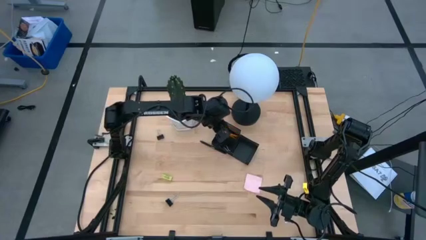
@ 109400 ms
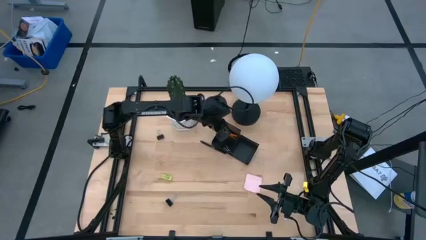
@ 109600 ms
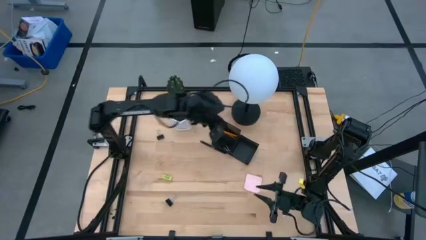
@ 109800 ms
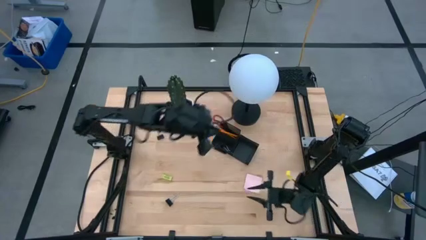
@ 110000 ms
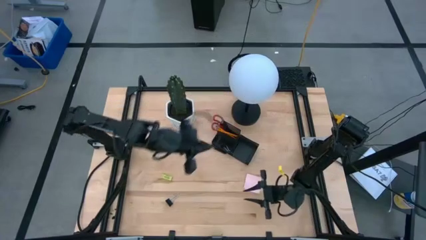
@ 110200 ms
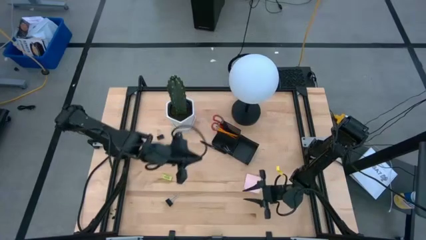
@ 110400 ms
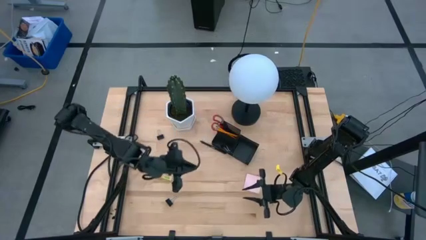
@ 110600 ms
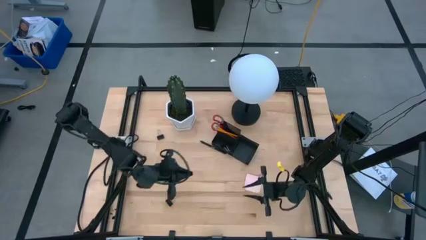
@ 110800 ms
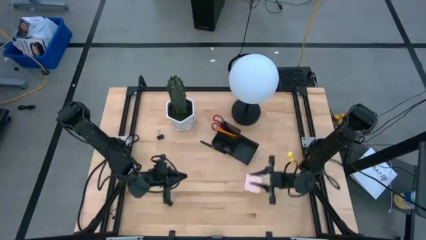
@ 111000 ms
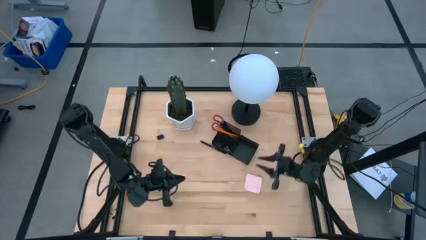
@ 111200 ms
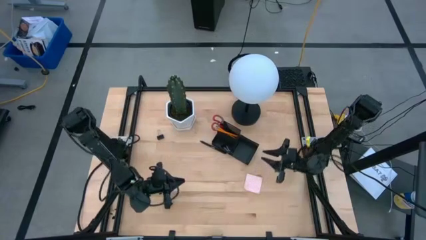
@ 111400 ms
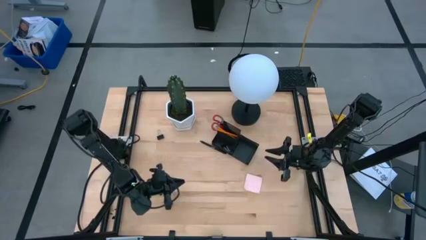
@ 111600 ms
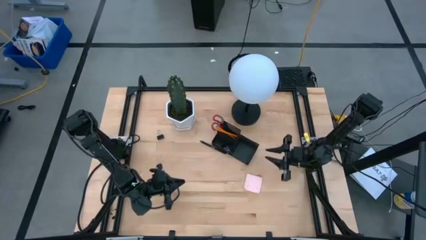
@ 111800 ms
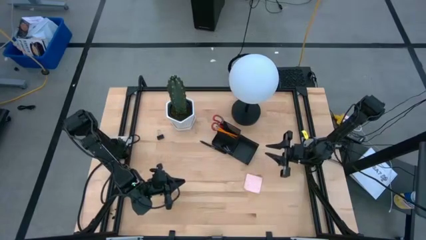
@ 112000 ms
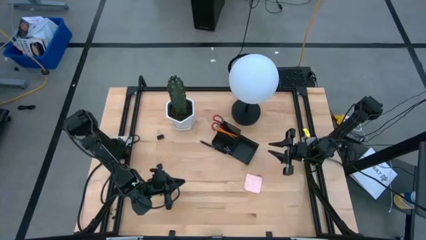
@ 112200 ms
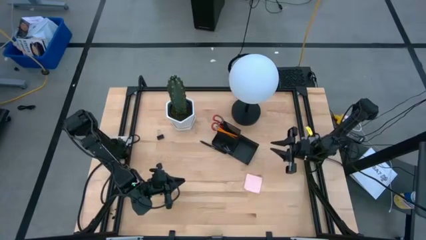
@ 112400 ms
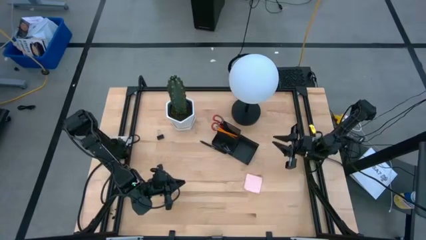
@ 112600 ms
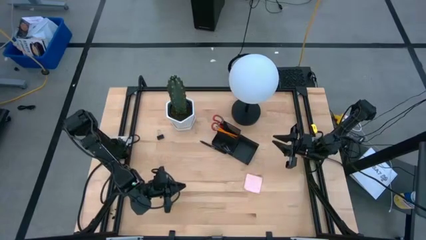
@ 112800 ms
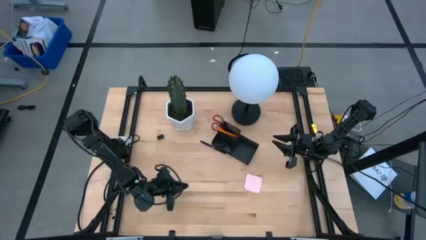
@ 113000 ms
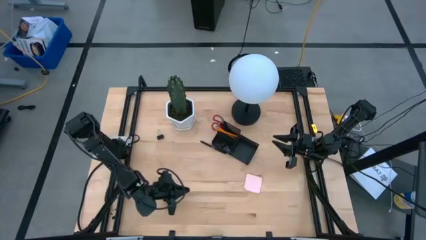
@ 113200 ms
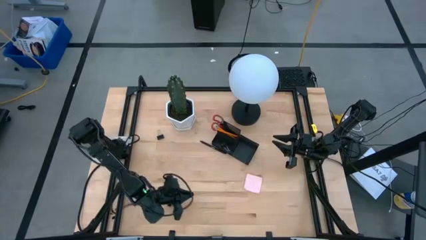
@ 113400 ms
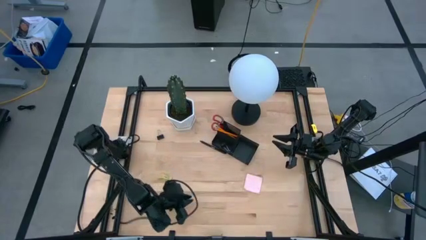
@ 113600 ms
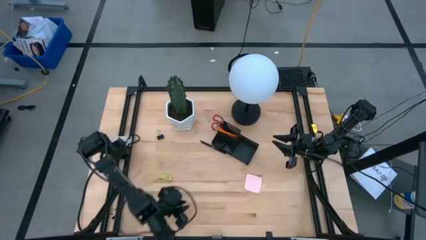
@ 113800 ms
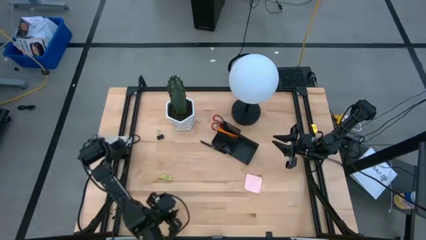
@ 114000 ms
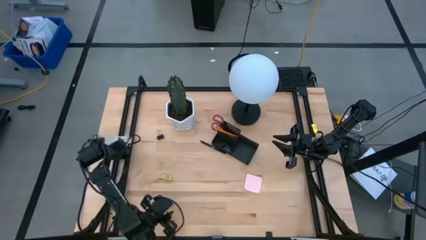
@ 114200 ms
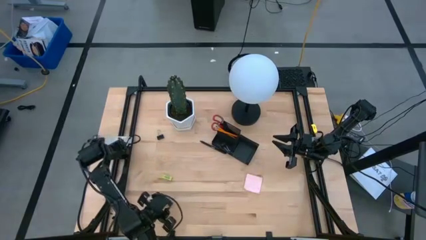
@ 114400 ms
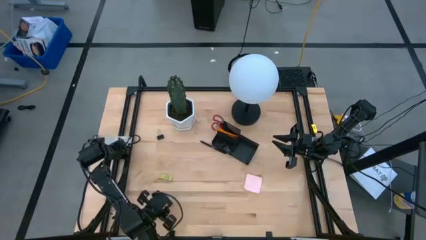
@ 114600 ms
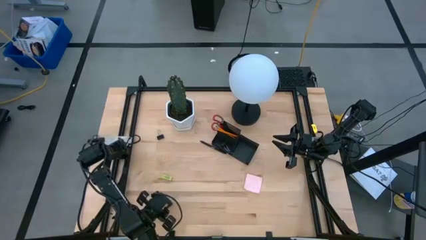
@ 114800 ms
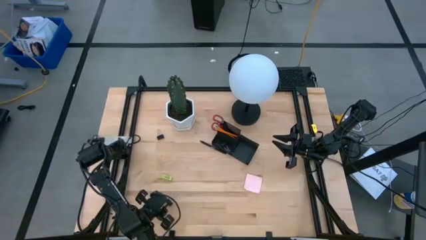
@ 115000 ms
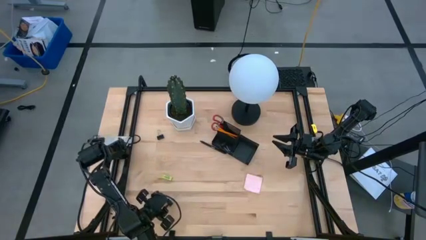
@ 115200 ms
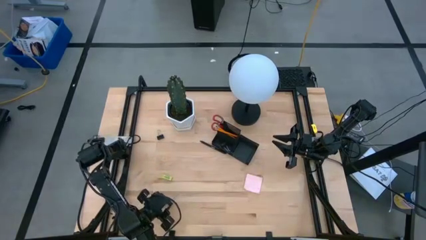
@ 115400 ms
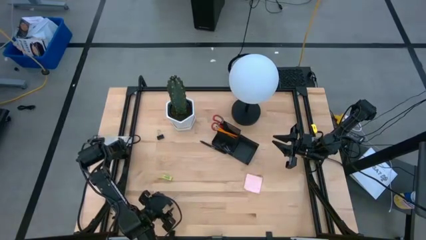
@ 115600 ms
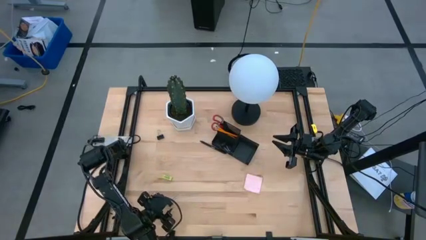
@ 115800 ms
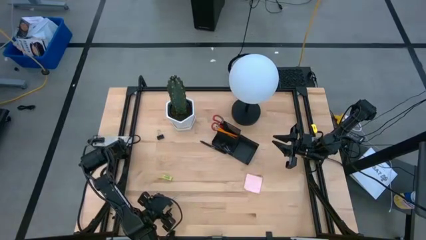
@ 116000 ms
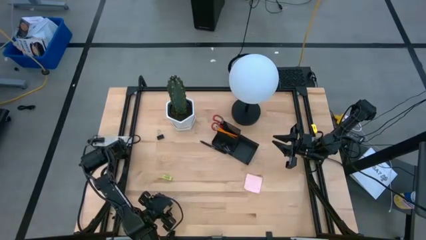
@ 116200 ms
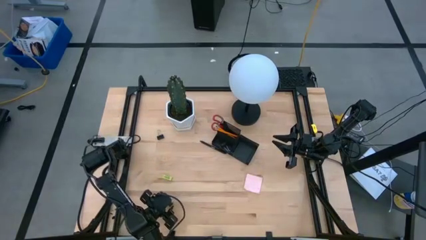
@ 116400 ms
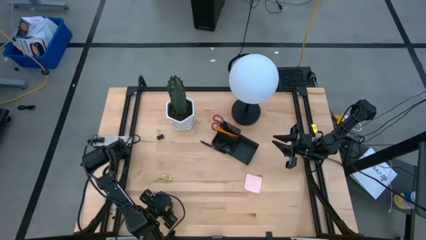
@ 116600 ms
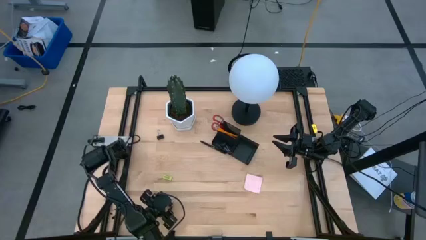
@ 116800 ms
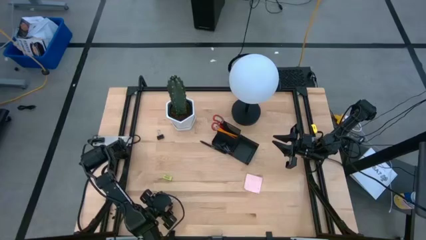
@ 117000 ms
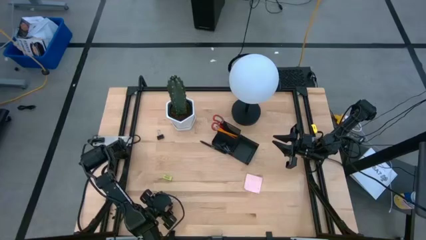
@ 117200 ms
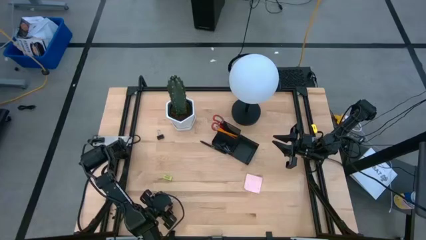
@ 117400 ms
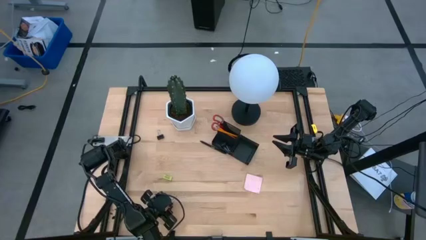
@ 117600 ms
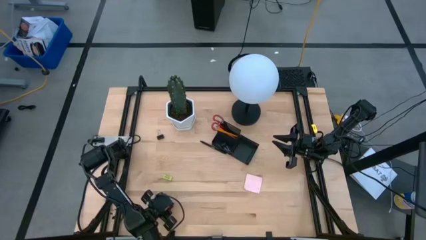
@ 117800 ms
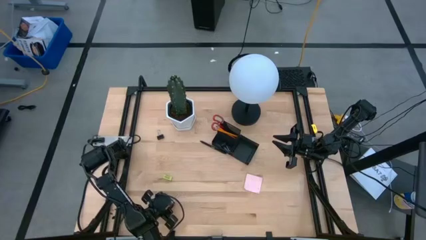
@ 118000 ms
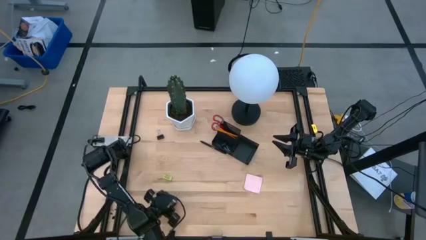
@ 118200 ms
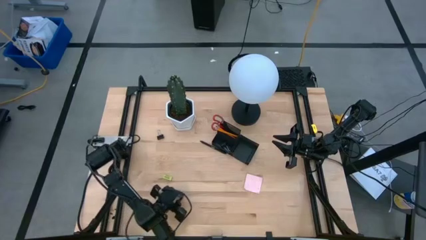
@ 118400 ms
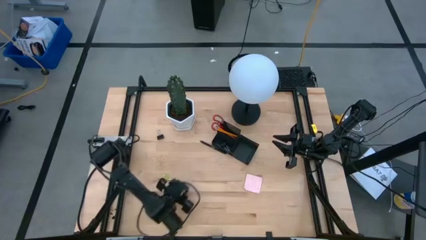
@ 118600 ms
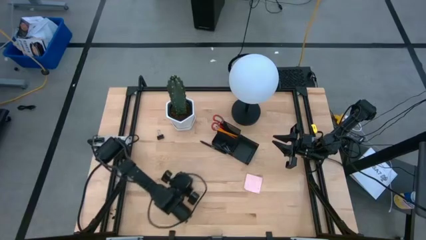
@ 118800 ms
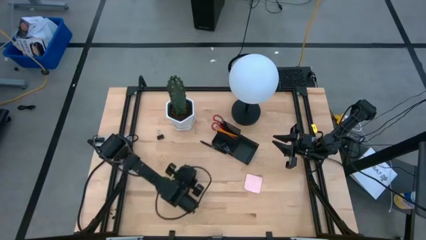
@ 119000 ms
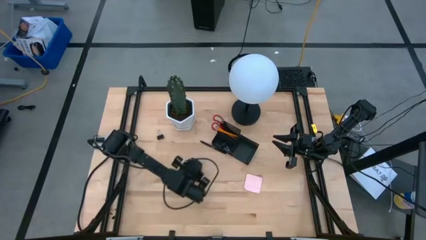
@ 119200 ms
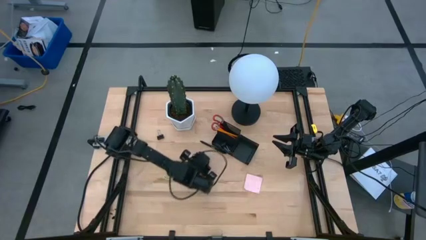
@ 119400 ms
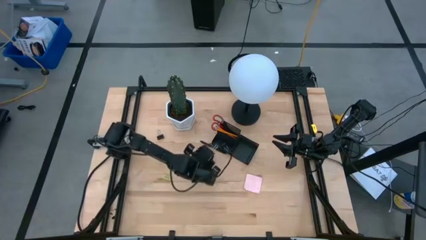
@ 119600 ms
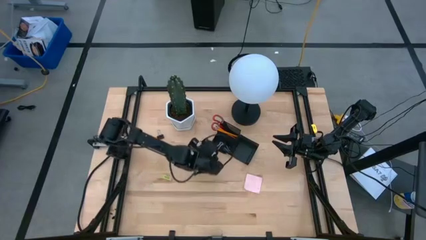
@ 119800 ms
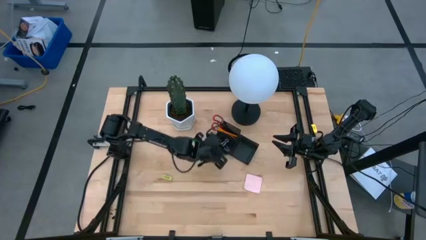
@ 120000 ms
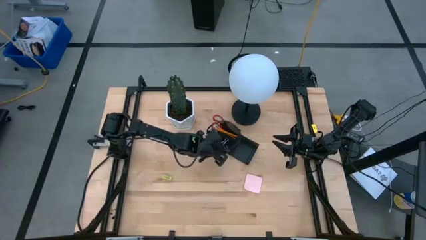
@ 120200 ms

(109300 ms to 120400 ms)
Task: Pick and place office supplies into organizer
Put the black binder clip into the black desk organizer

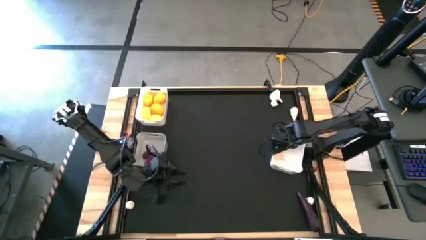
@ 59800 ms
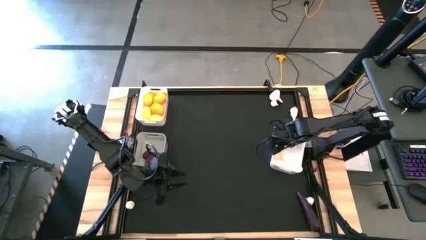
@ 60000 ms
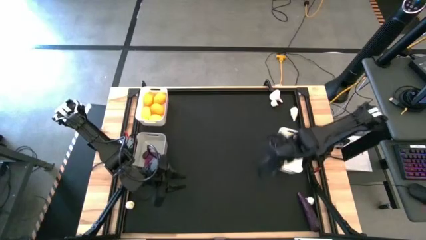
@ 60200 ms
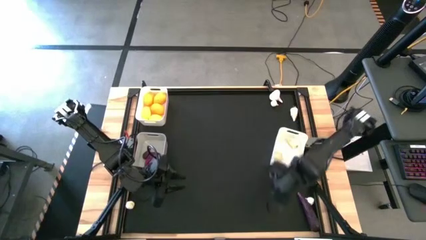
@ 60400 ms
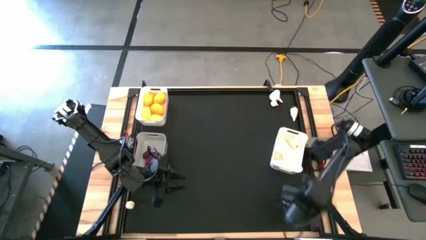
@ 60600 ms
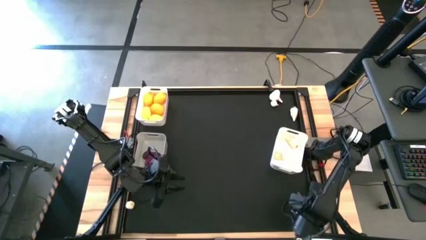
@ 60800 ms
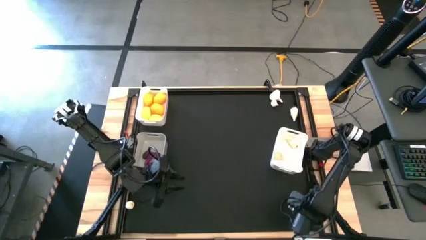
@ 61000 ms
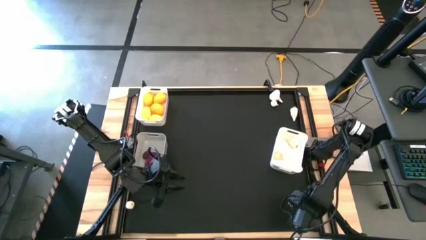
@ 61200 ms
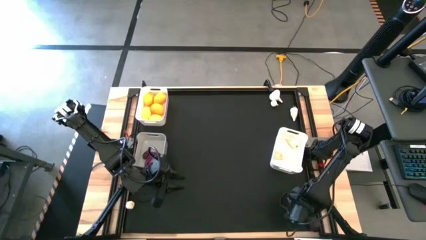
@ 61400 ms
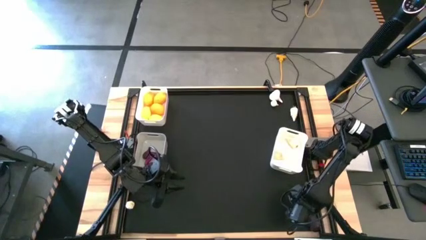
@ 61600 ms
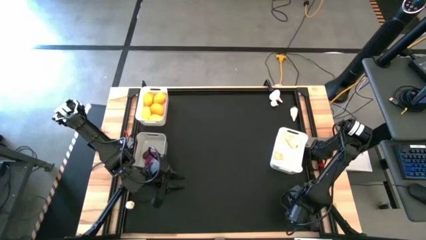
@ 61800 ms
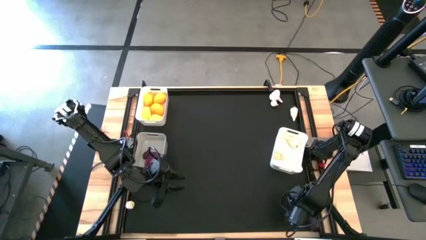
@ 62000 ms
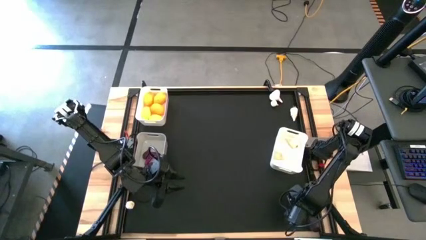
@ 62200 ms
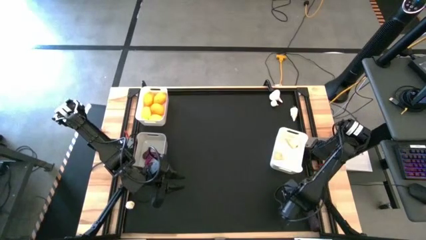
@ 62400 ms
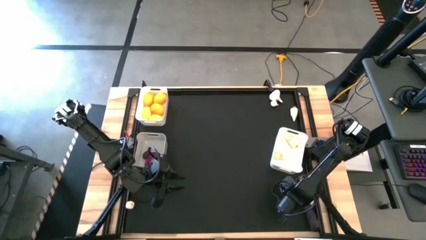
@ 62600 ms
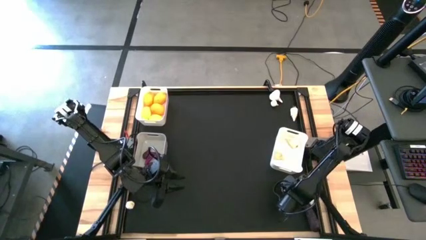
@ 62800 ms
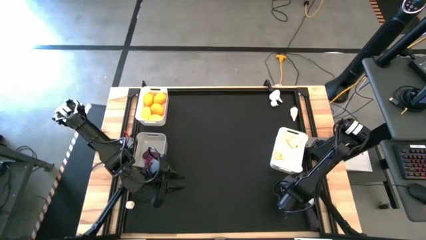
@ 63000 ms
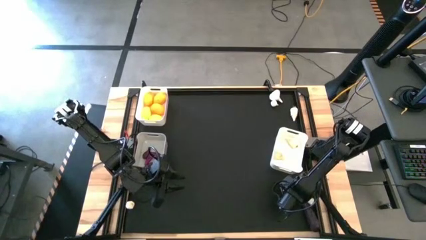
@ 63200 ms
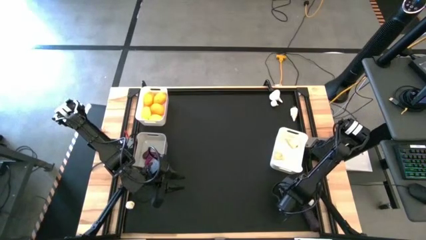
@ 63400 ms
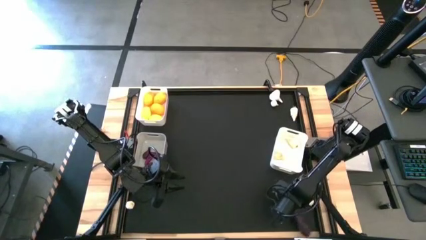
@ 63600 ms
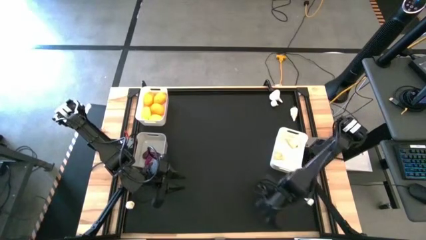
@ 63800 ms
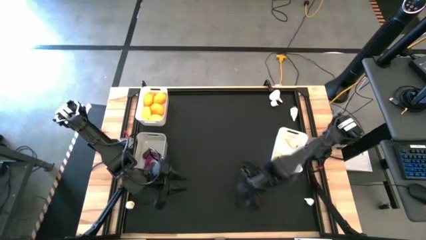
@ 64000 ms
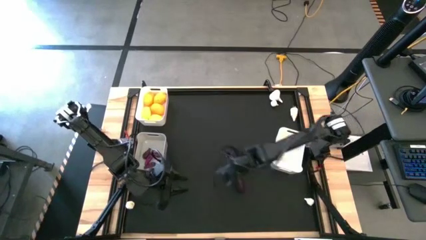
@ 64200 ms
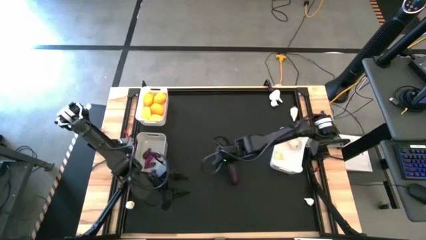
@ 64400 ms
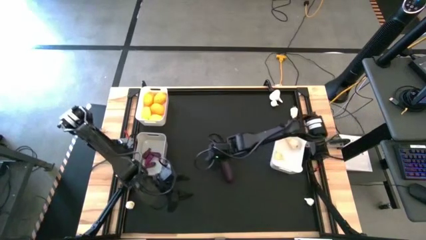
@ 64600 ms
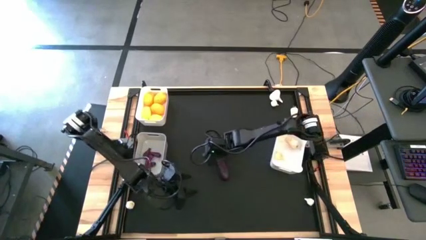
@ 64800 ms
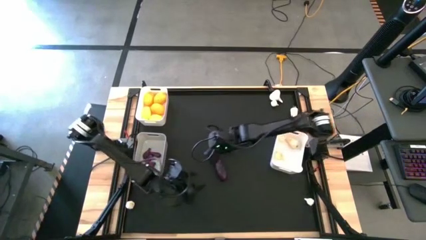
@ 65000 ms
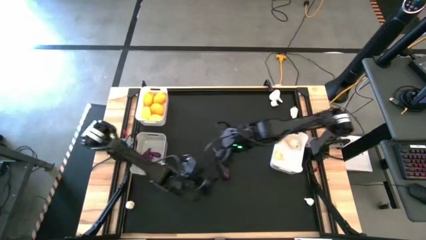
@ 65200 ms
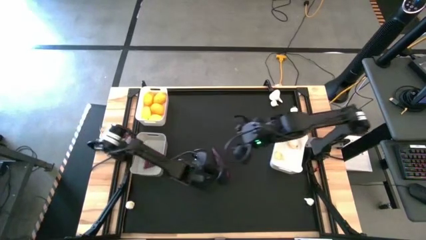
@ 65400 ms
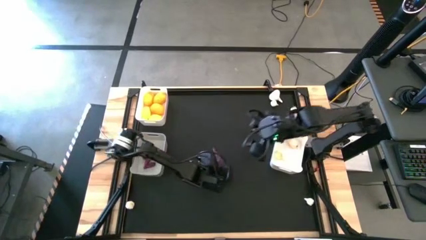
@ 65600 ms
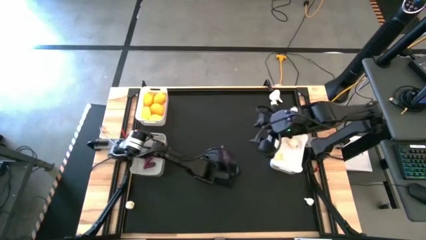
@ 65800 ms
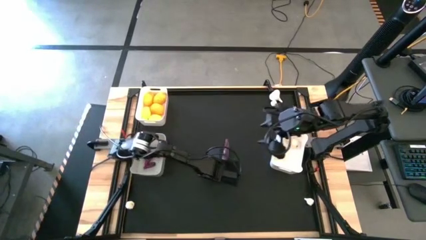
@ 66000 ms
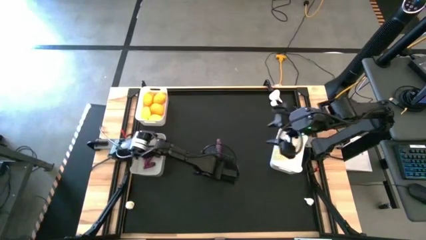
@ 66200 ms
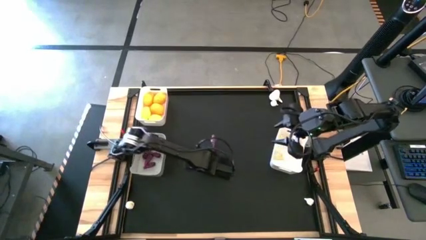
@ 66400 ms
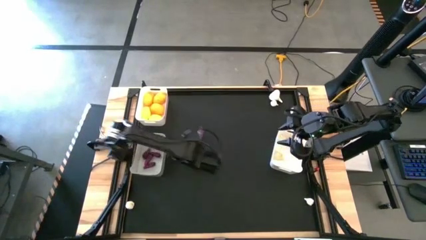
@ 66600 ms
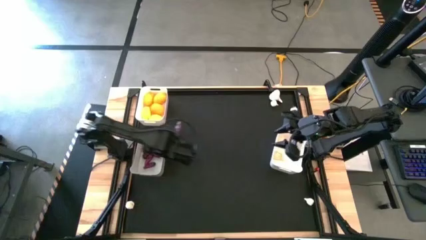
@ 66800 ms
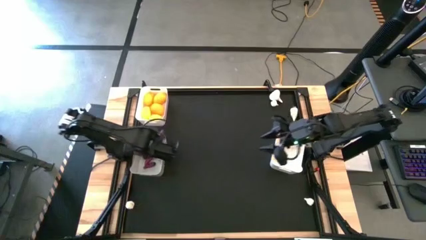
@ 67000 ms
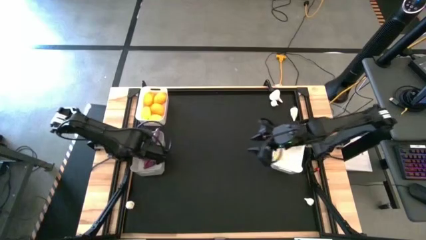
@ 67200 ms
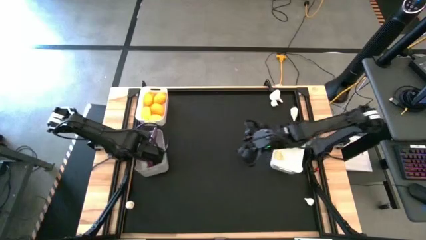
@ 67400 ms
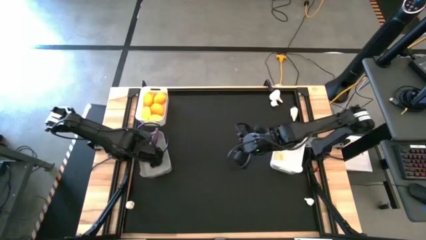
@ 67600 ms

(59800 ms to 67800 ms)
Task: Sort produce into baskets
Put the violet eggplant into the gray bin
